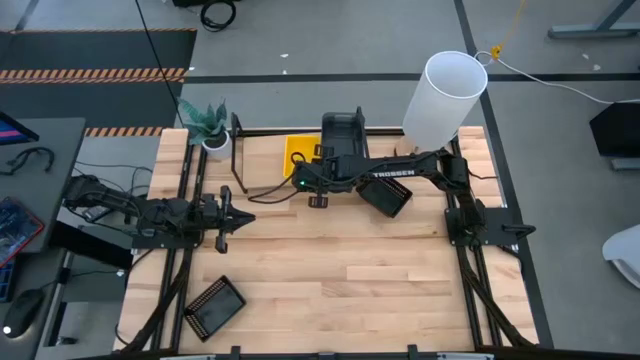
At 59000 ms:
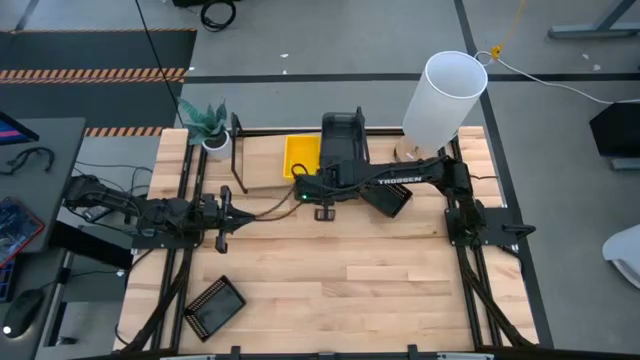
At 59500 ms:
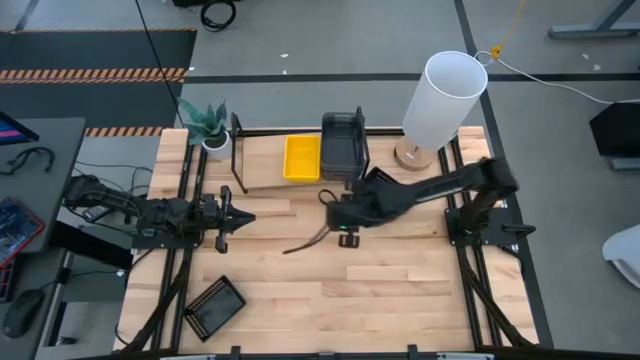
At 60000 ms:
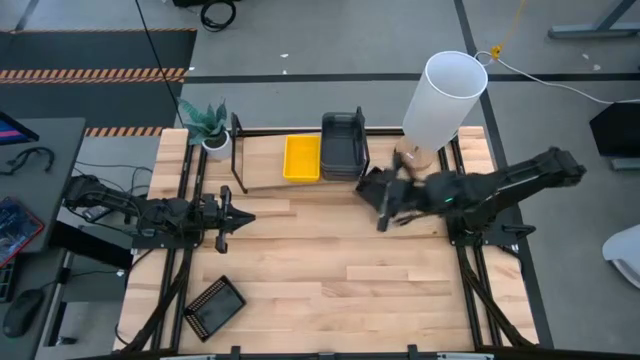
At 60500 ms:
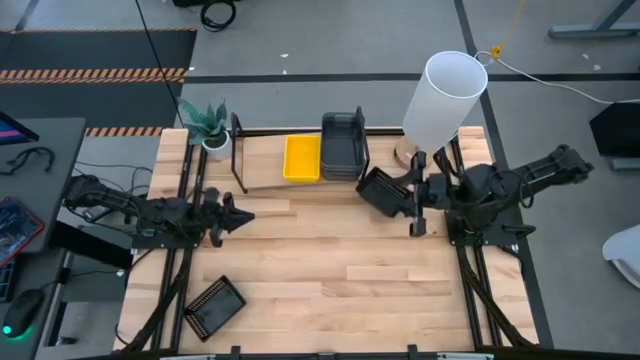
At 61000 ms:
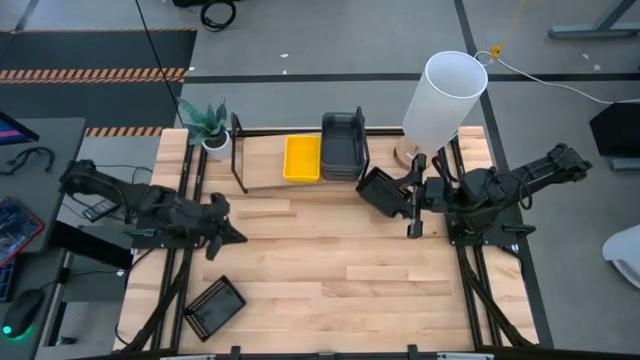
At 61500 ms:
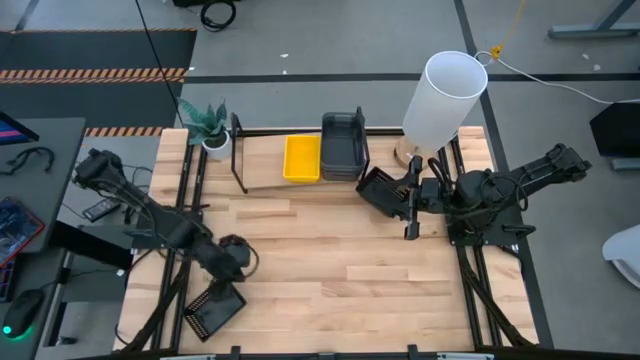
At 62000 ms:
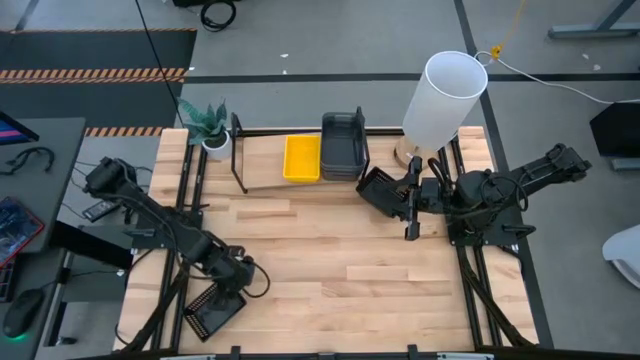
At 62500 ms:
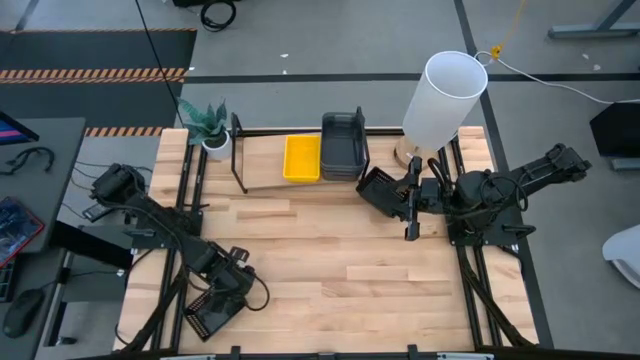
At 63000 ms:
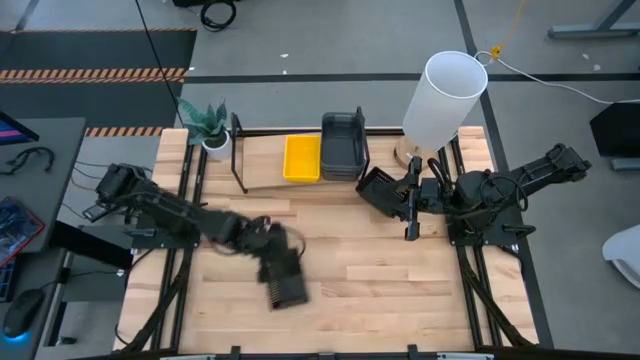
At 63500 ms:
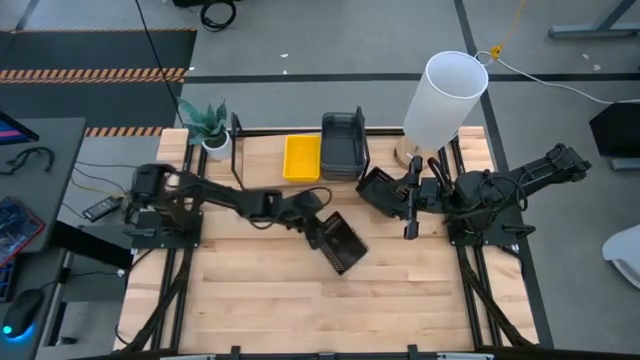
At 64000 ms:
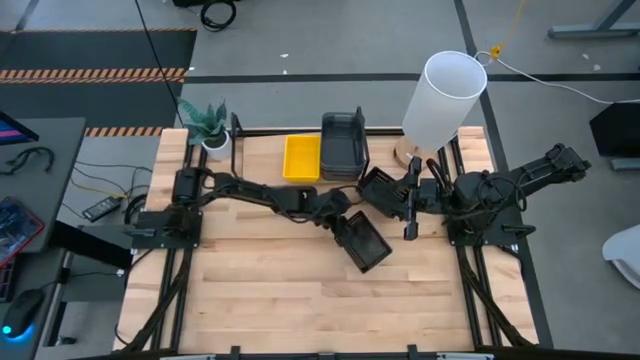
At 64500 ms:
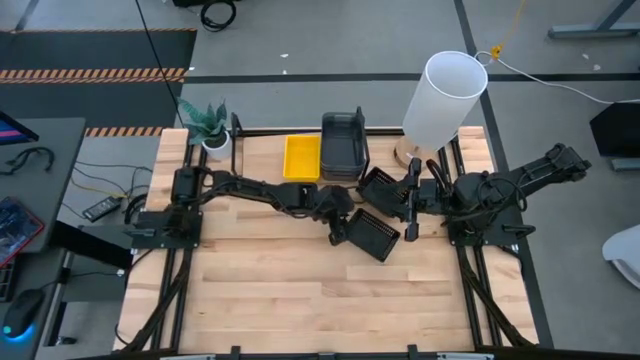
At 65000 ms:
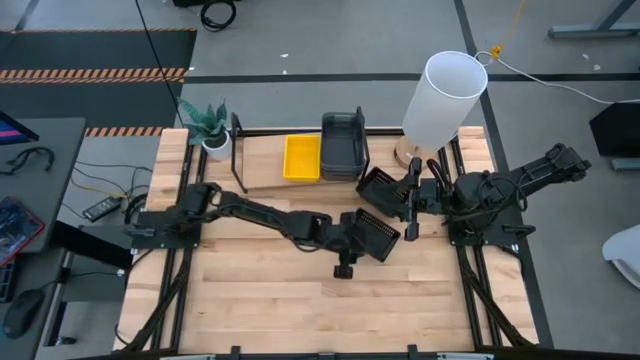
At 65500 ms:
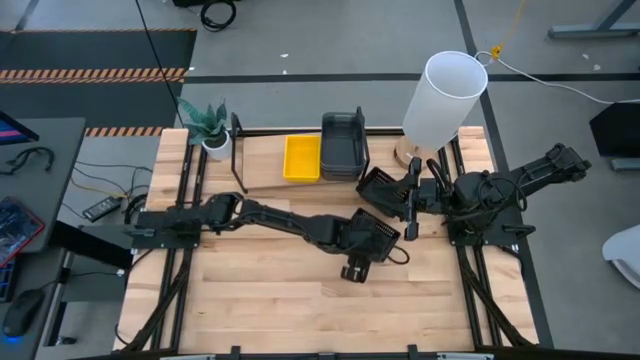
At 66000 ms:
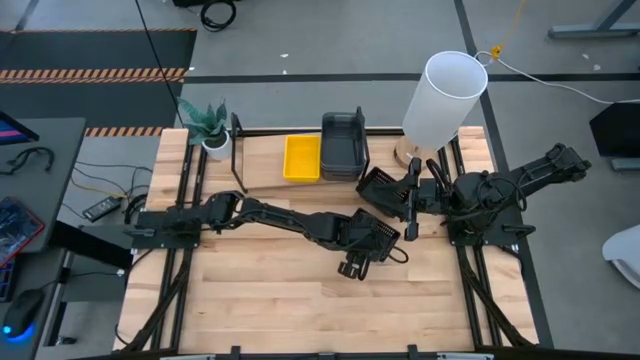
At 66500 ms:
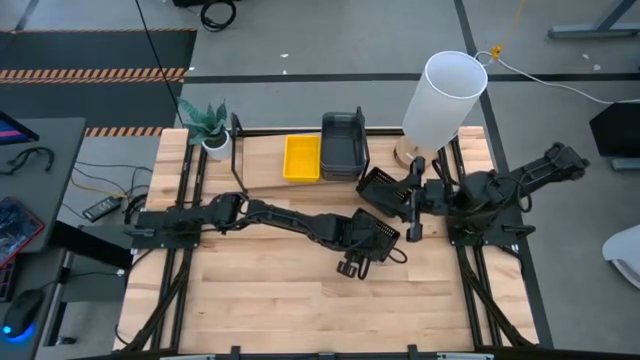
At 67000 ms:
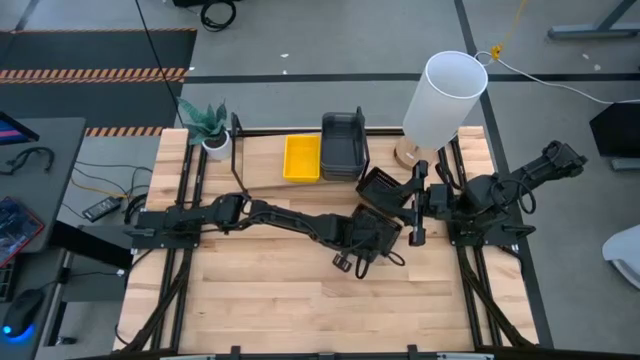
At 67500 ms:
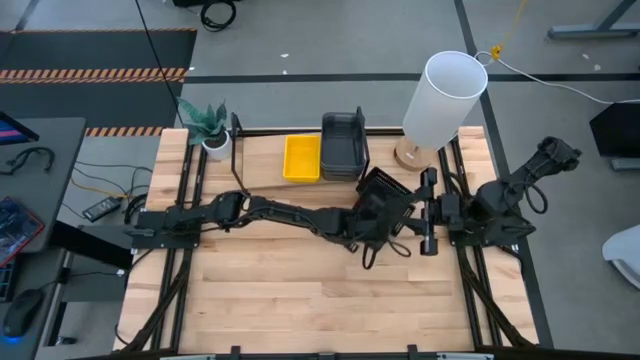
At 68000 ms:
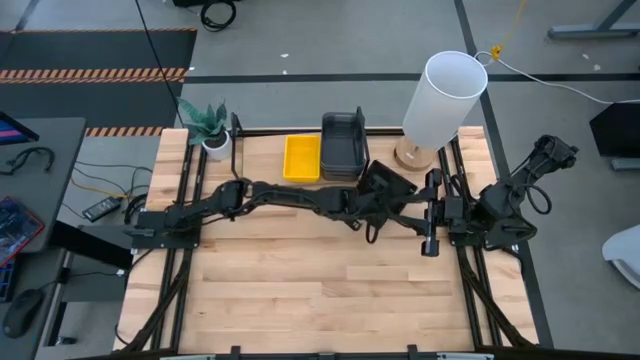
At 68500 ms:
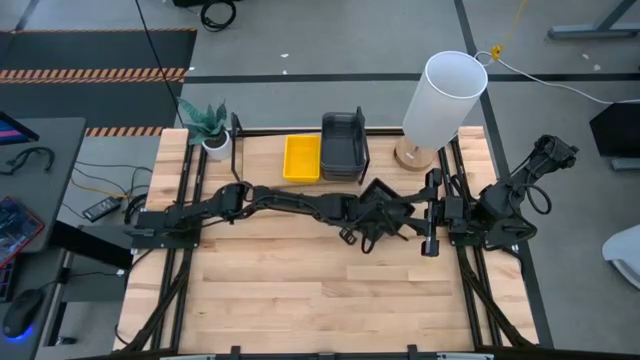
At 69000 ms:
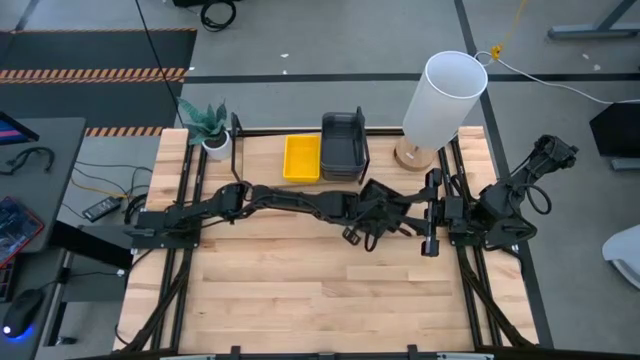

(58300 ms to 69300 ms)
Task: Stack baskets on shelf by color
Stack the bottom black bin on top of the black bins

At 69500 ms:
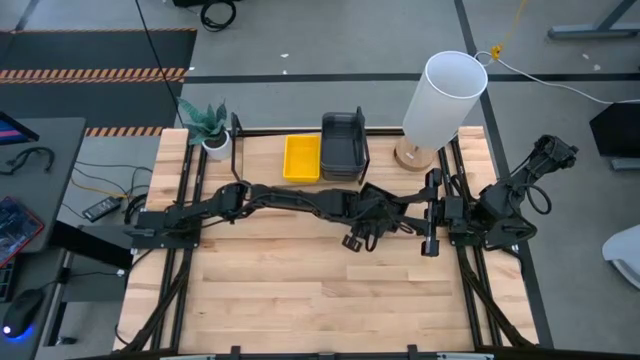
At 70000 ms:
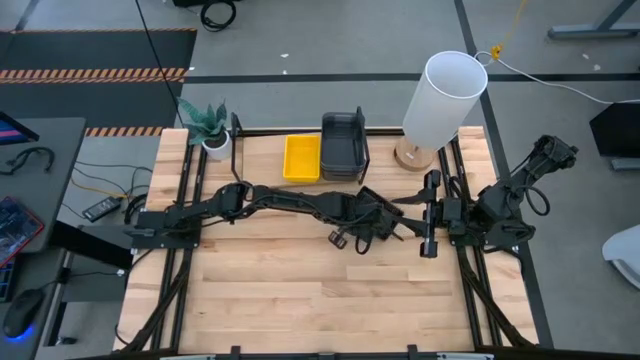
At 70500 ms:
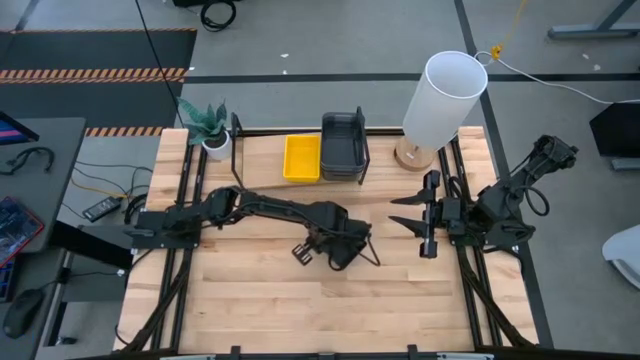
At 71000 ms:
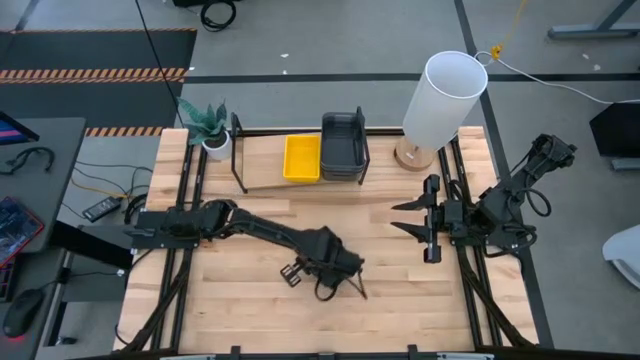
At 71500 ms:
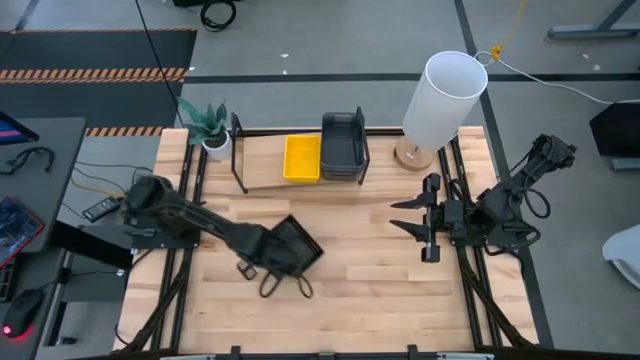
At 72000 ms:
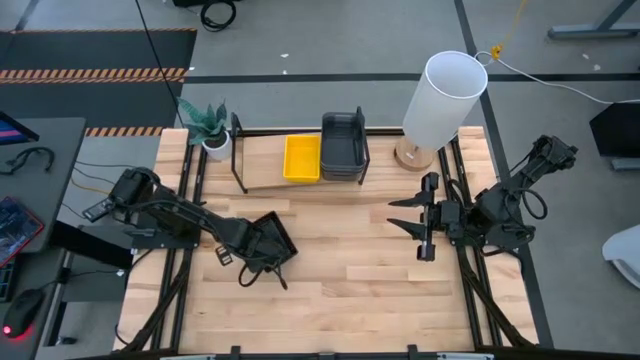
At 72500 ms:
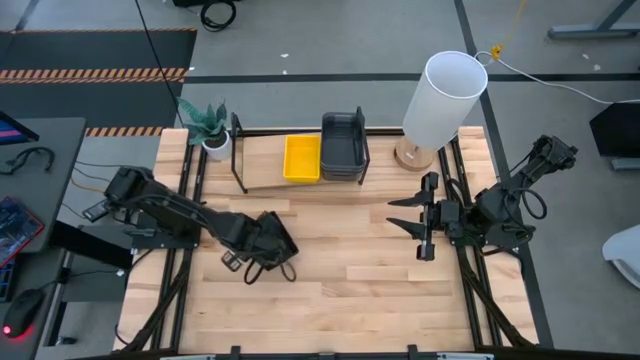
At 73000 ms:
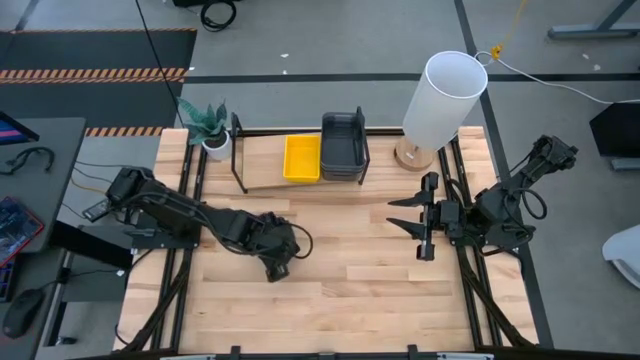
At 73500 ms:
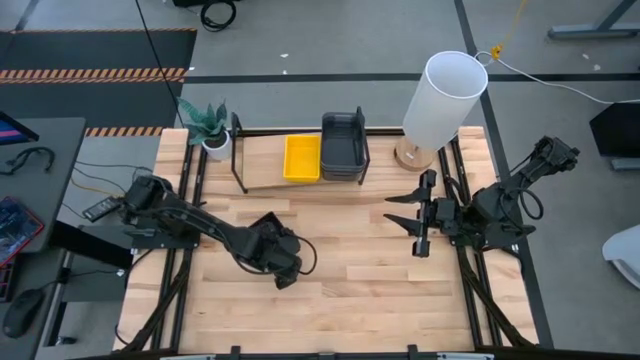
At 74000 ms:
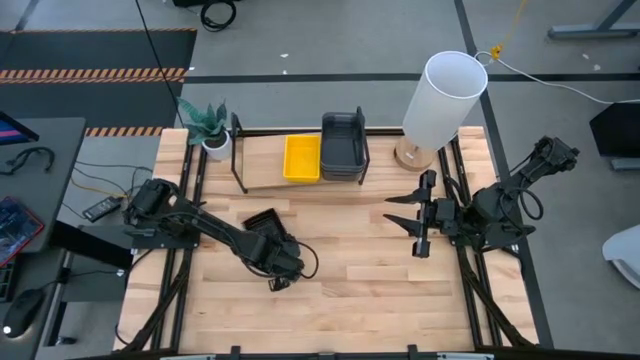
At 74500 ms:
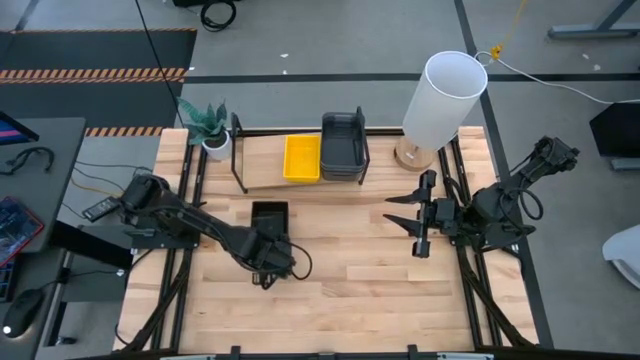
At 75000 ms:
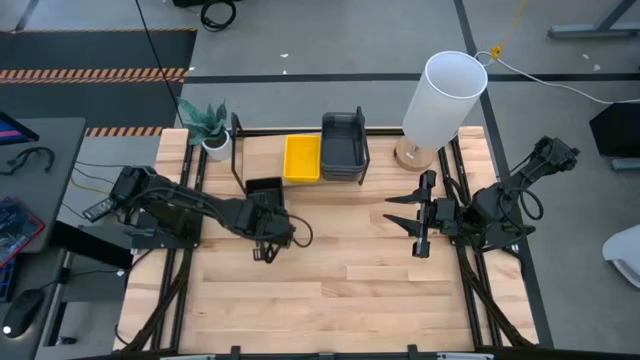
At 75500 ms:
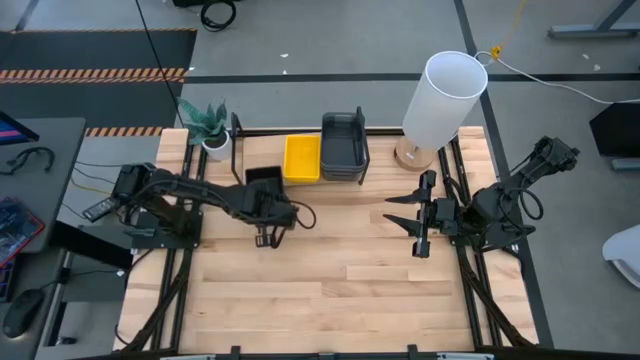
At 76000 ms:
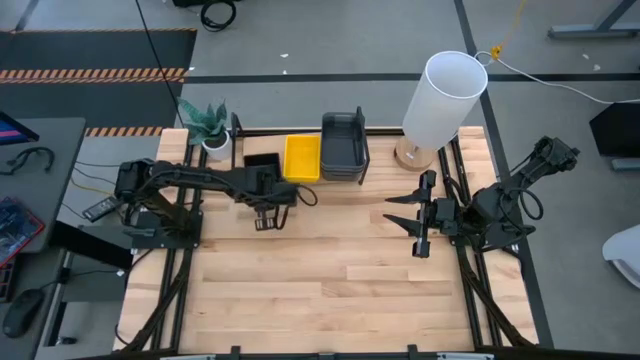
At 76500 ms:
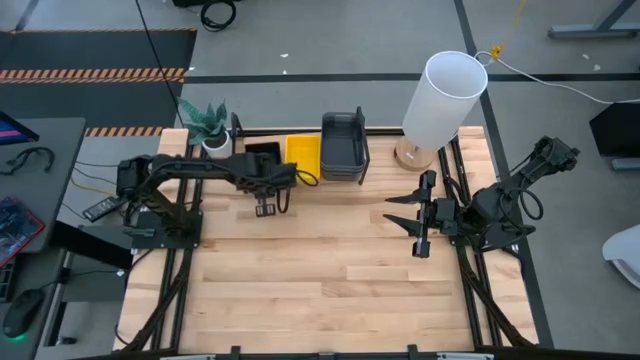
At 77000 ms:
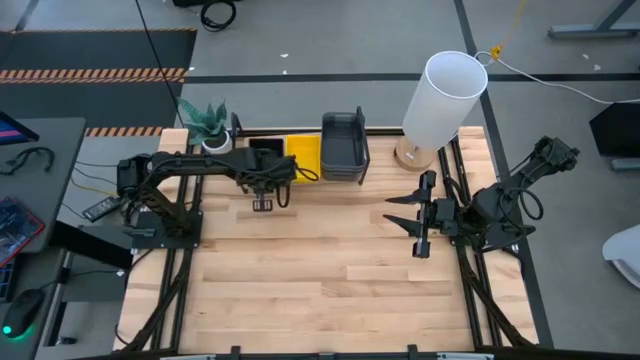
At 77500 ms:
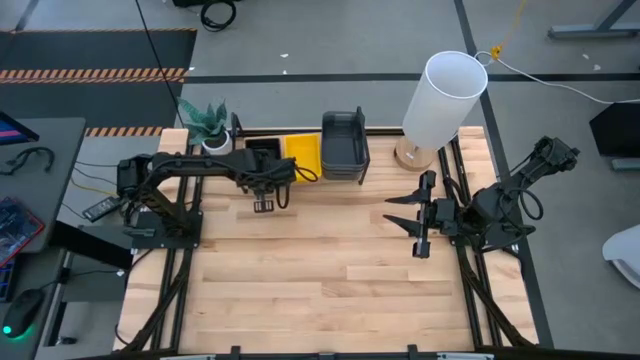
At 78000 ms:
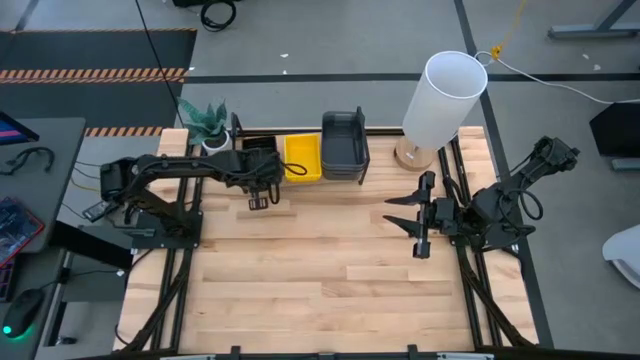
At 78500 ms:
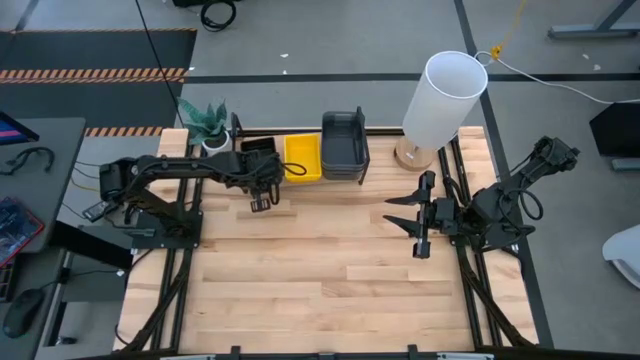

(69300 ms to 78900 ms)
Put the stacked black bins on the shelf

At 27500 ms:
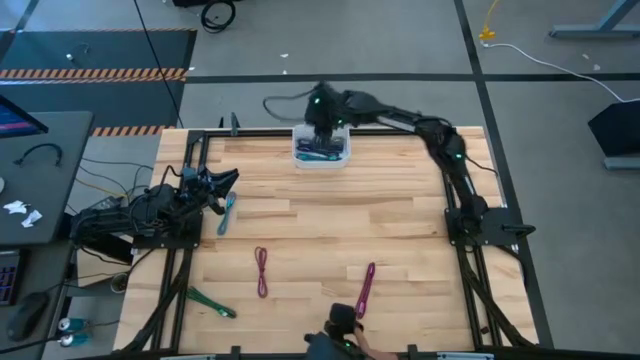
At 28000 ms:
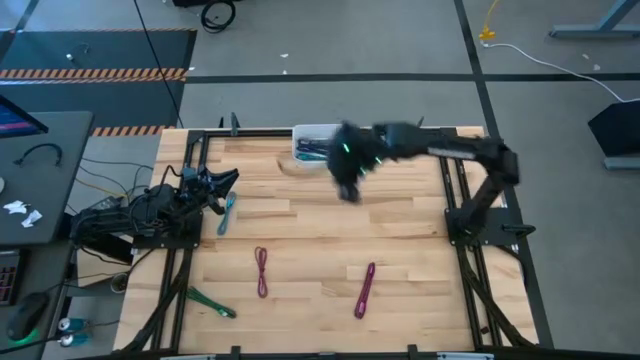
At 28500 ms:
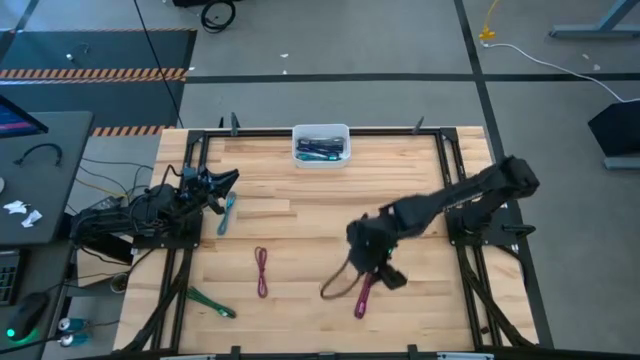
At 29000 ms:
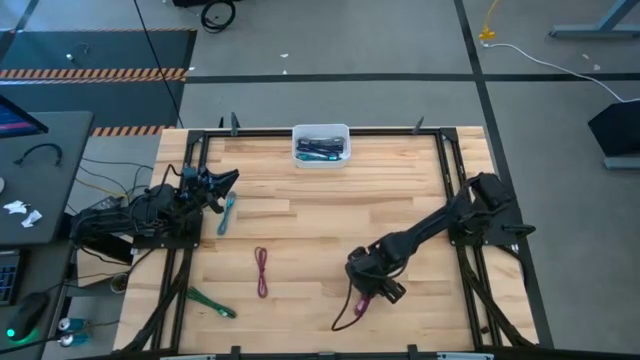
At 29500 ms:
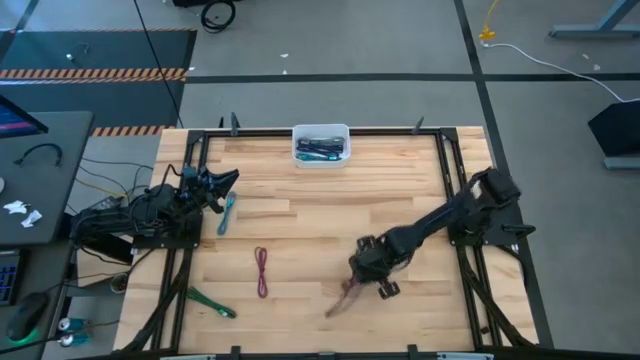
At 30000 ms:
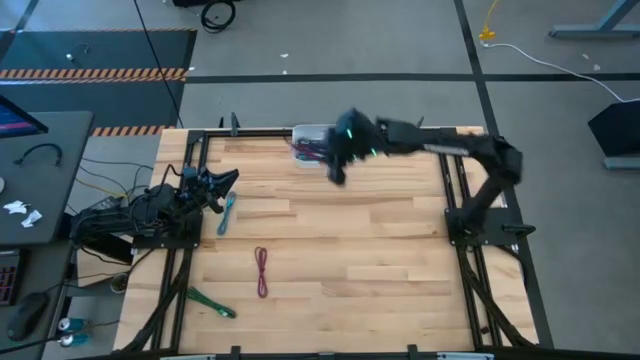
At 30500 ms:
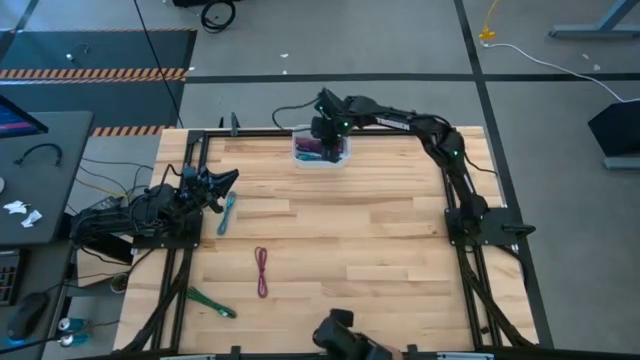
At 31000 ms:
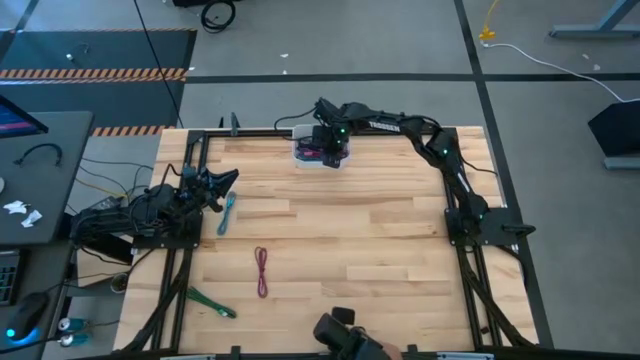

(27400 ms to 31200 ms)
Task: Pick and place USB-C Cables
Put the right pink charger cable into the white bin
